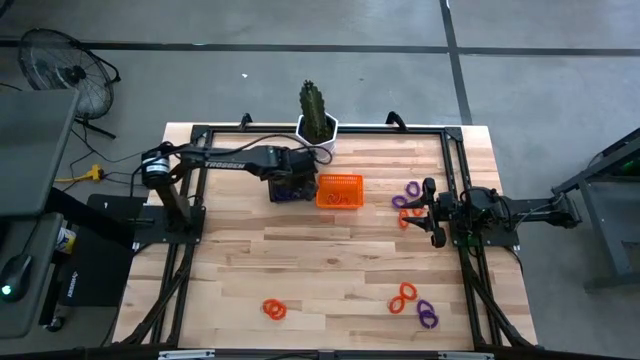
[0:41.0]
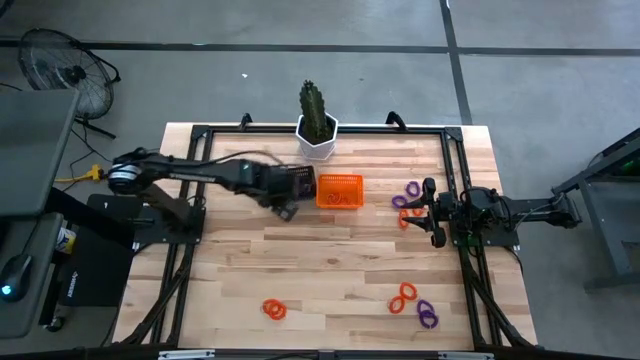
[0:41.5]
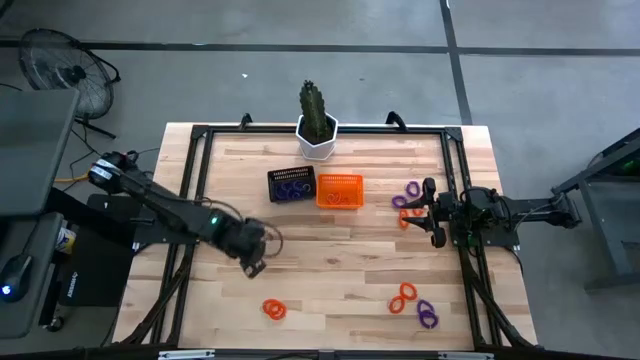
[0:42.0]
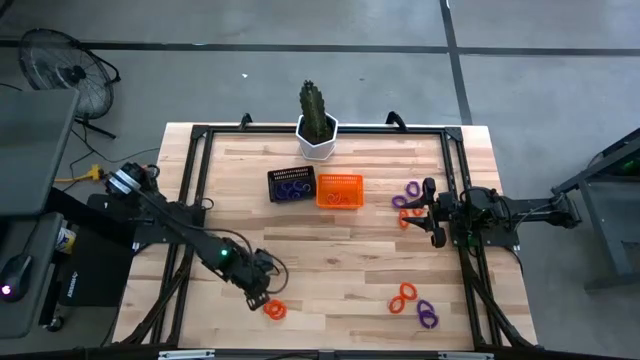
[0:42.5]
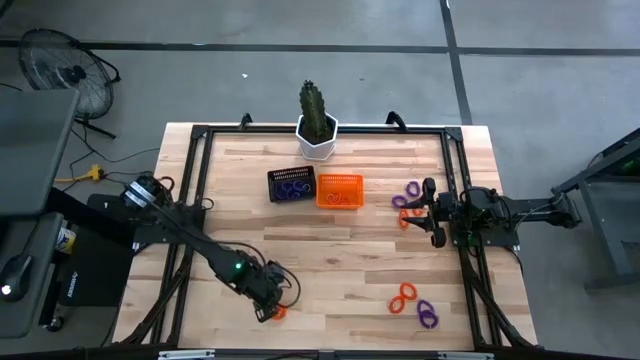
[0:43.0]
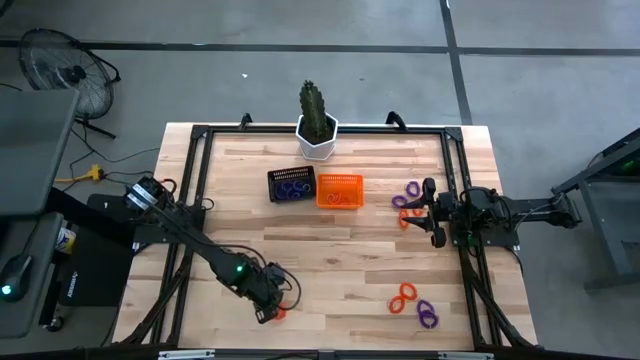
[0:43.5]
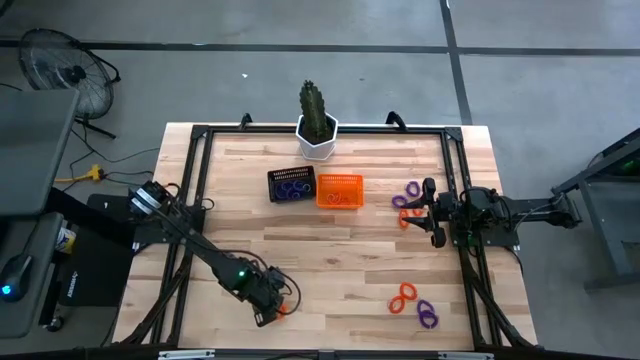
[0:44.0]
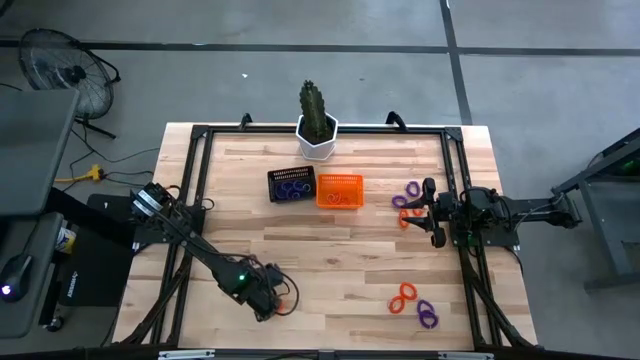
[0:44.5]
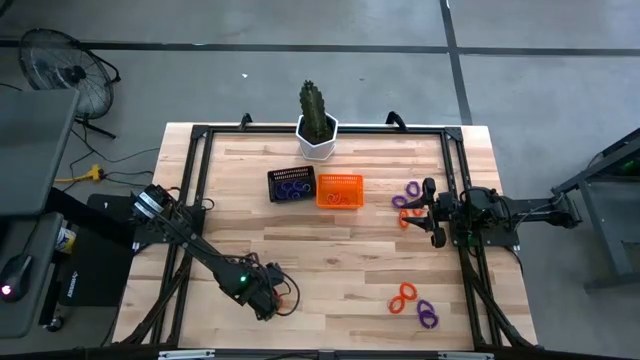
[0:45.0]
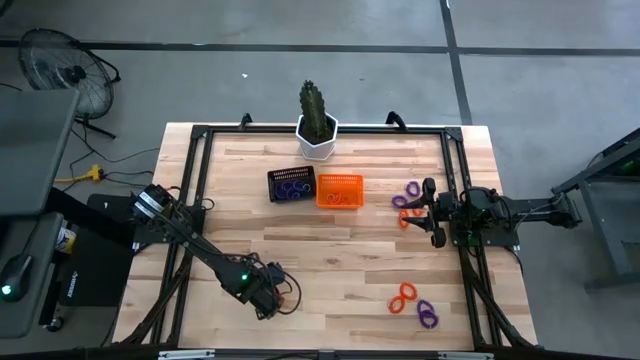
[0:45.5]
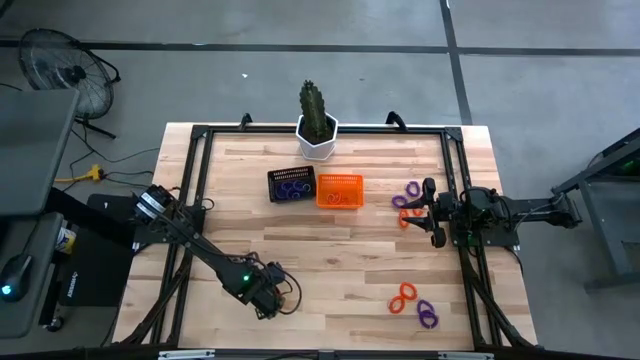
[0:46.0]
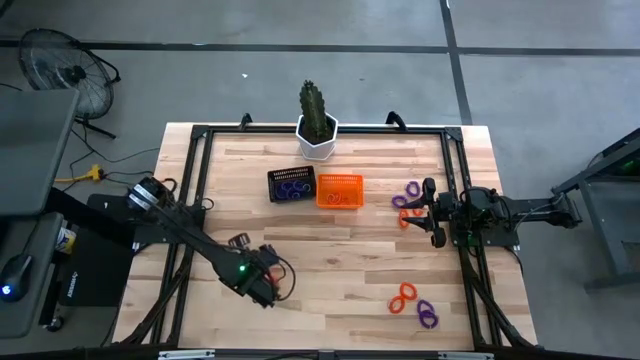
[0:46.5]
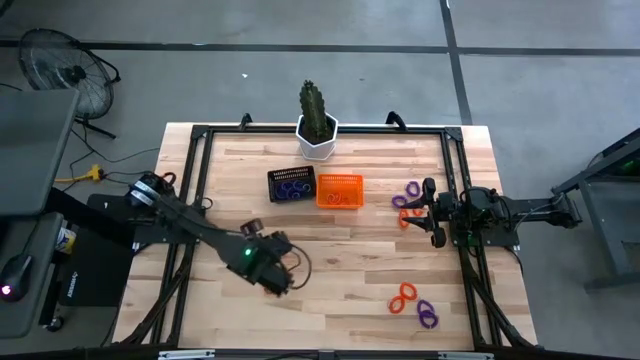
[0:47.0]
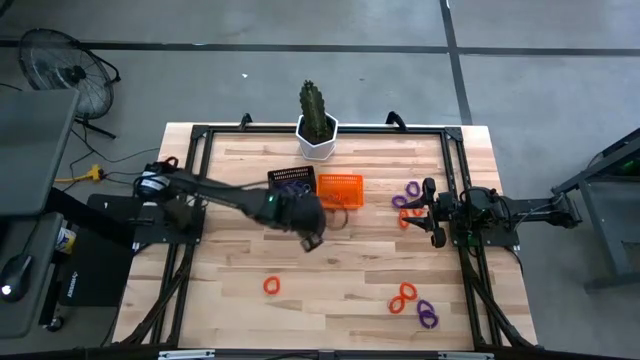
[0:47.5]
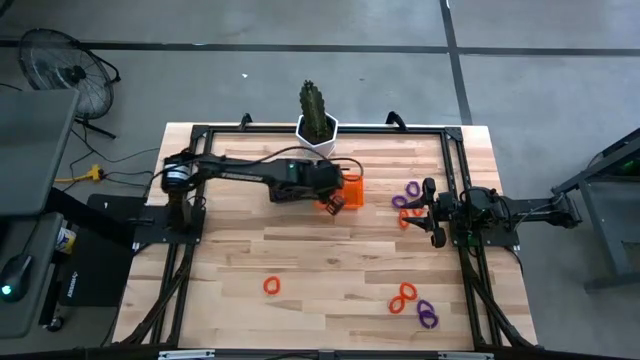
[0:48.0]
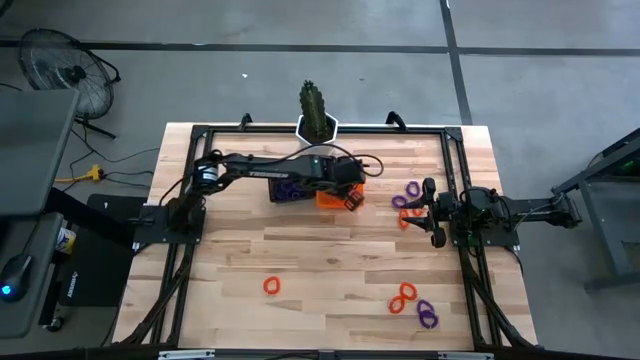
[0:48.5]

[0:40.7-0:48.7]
Task: Sort spring keychains
Put the orange spring keychain in the orange bin

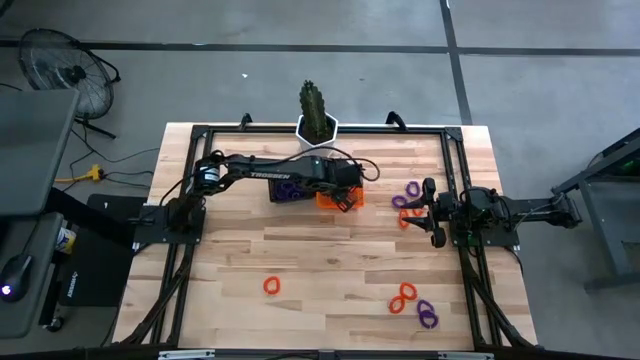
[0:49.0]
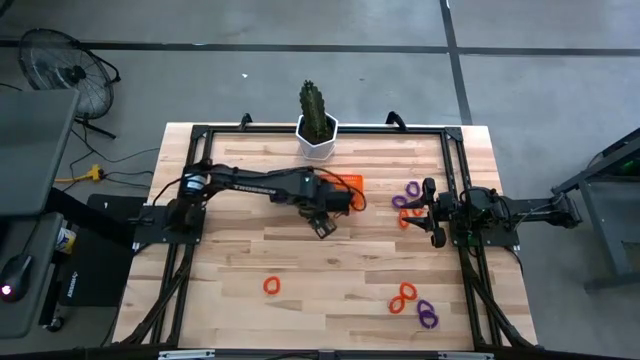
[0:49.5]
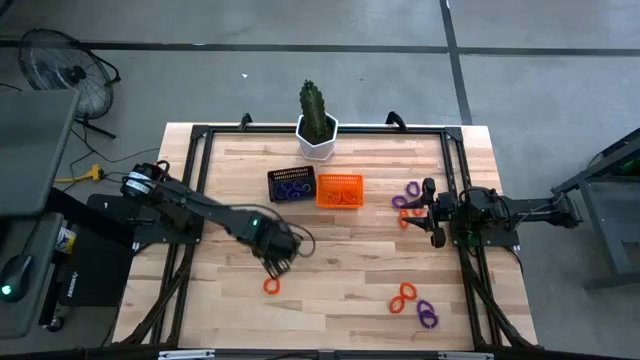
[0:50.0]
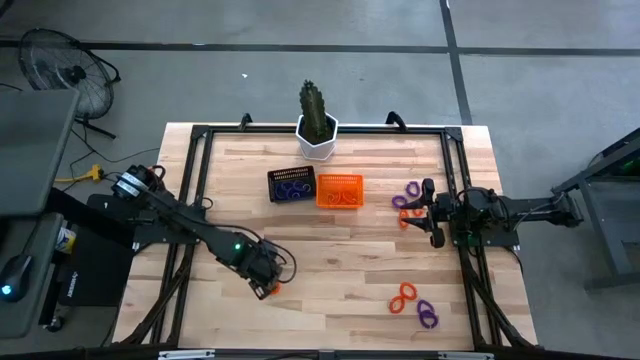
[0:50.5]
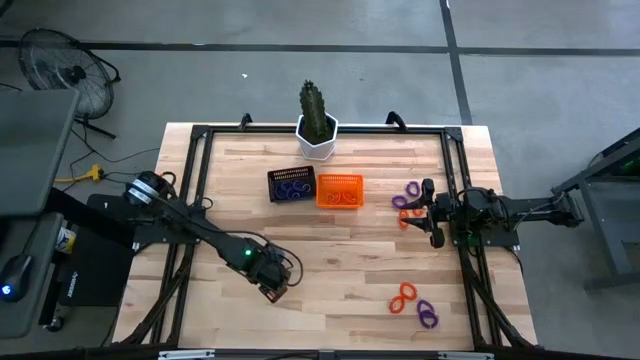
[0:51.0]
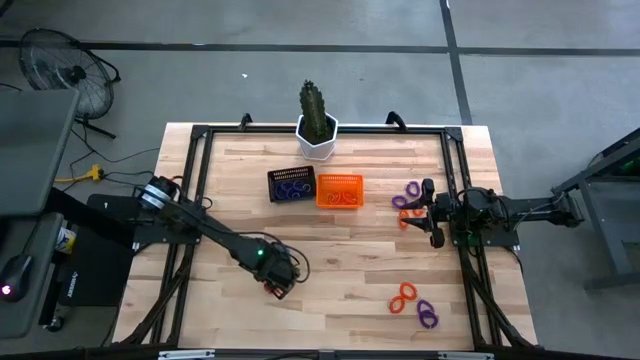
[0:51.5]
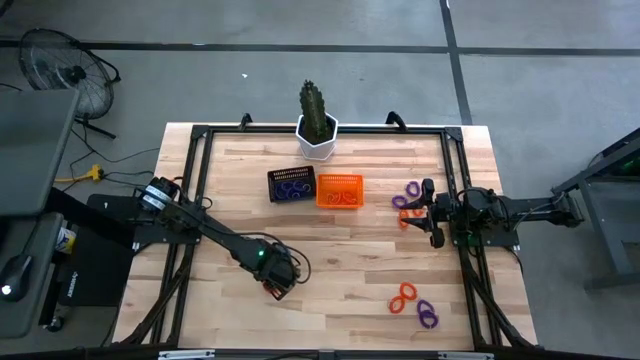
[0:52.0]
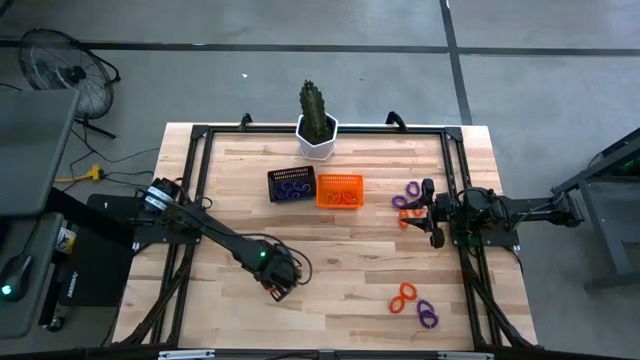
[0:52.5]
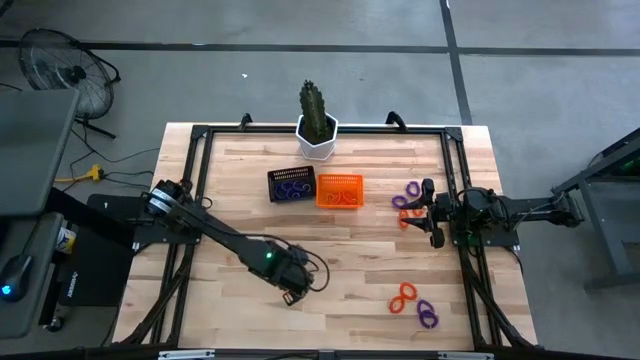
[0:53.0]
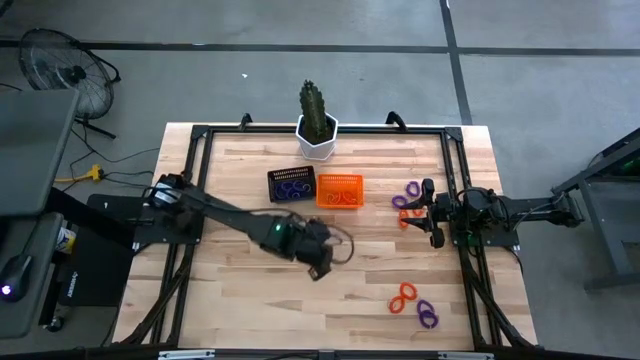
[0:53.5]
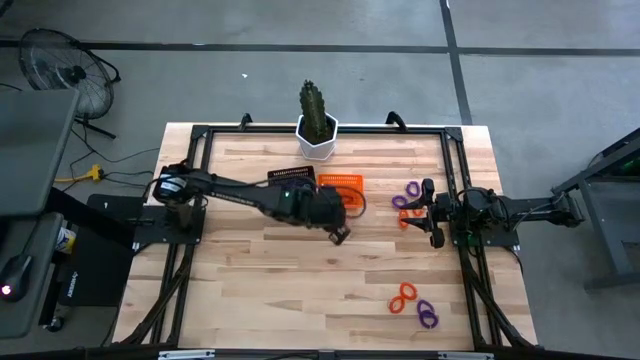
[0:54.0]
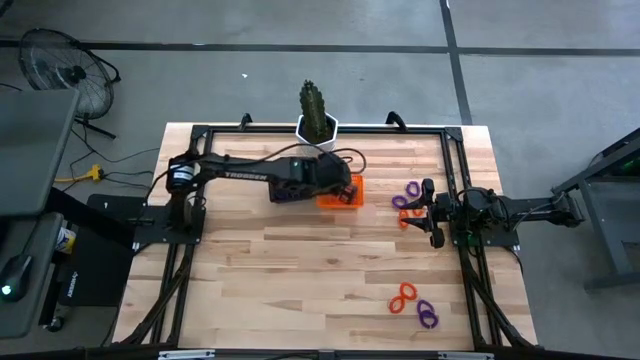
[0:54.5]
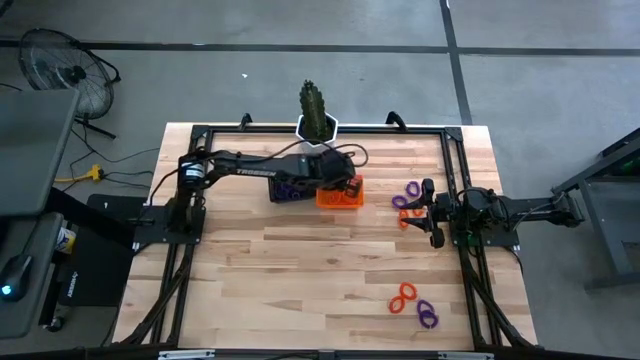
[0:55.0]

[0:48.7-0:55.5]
Put the orange spring keychain in the orange bin

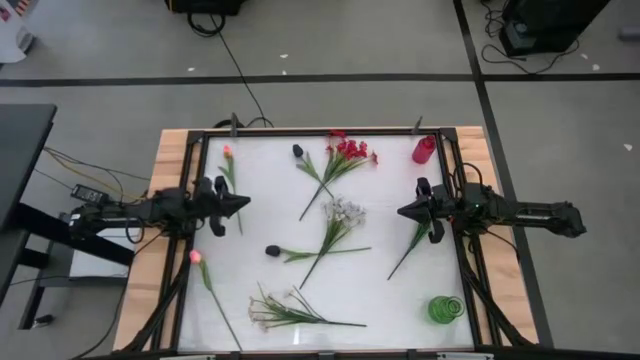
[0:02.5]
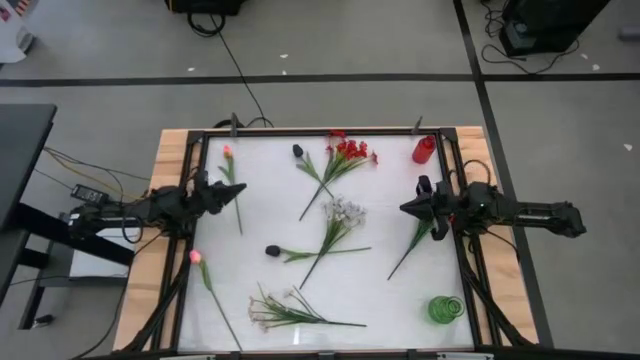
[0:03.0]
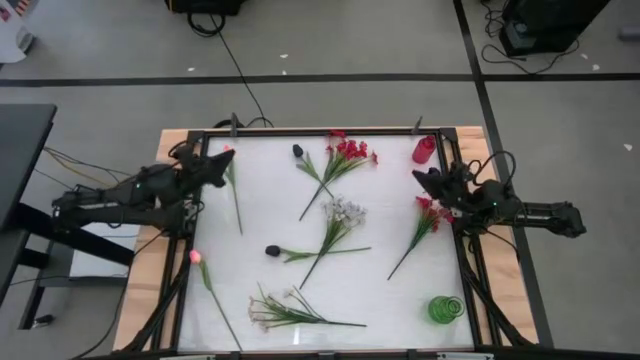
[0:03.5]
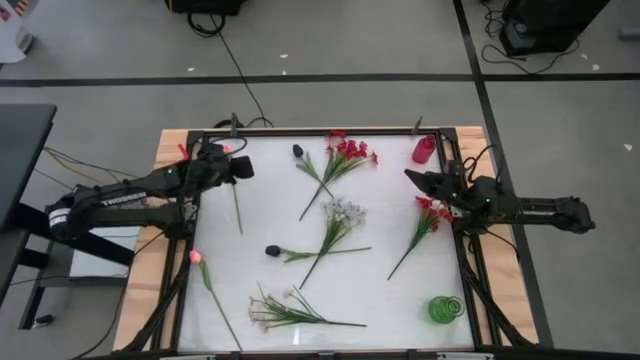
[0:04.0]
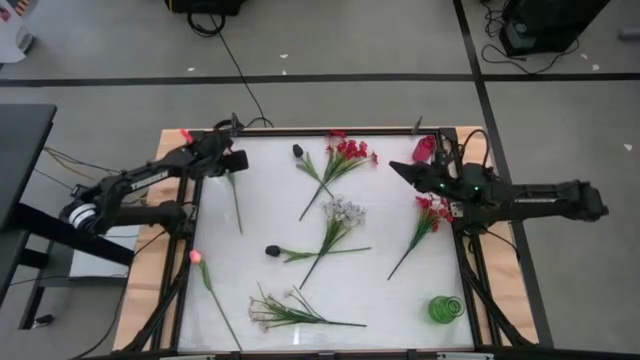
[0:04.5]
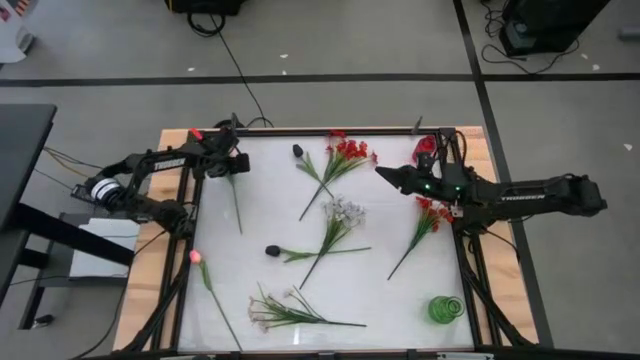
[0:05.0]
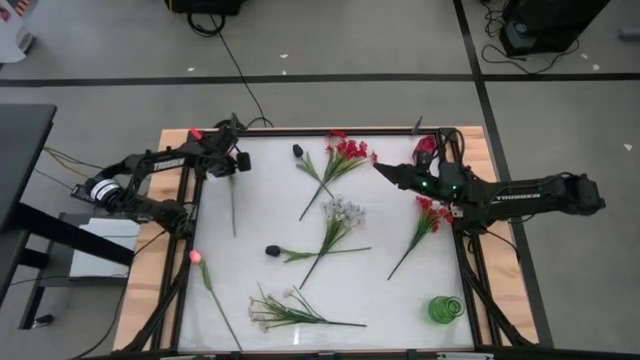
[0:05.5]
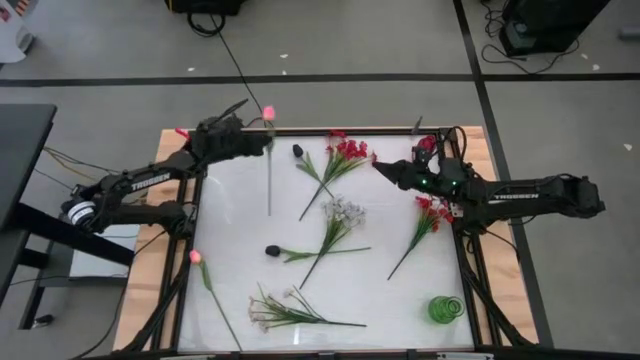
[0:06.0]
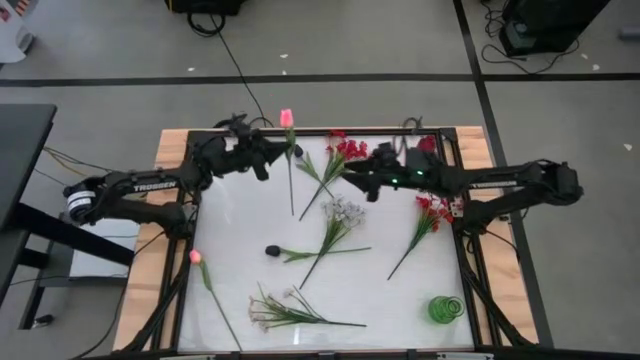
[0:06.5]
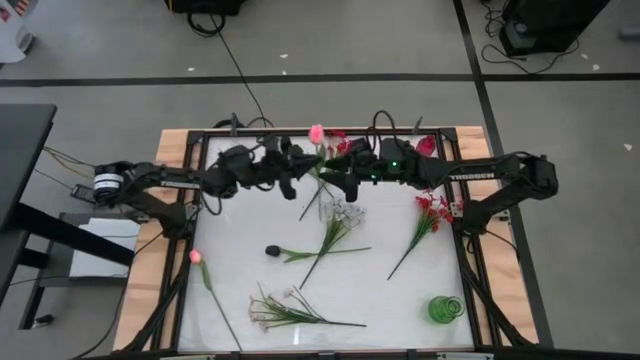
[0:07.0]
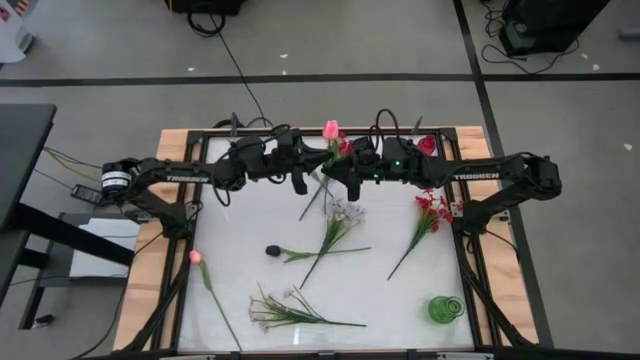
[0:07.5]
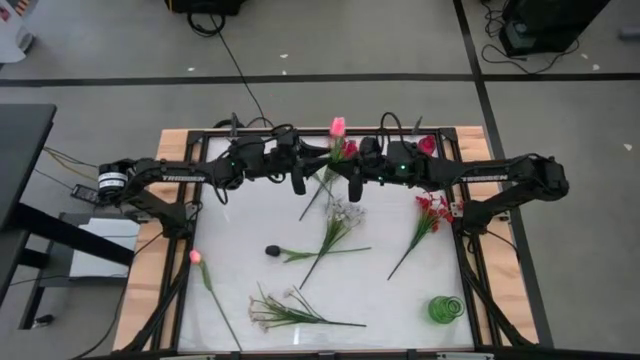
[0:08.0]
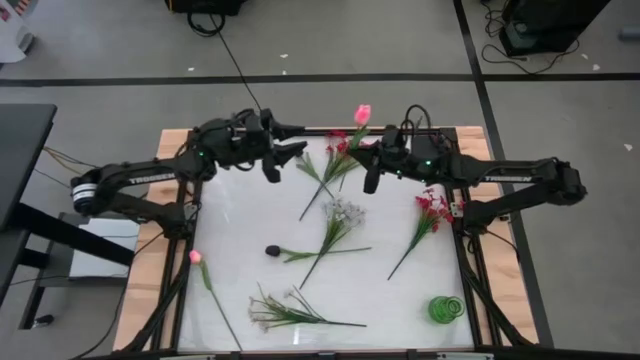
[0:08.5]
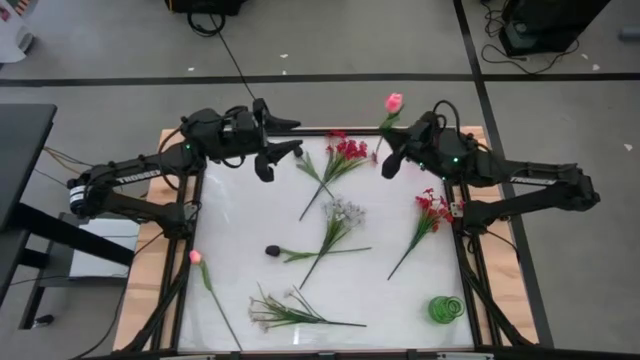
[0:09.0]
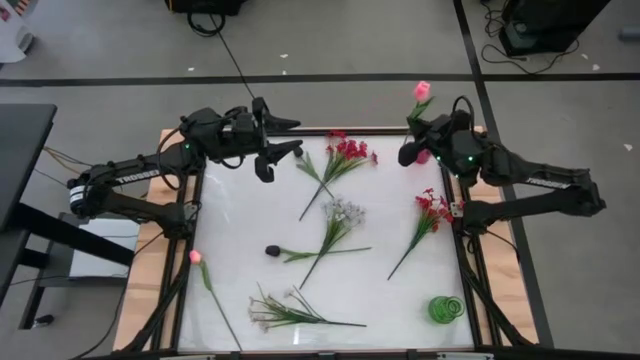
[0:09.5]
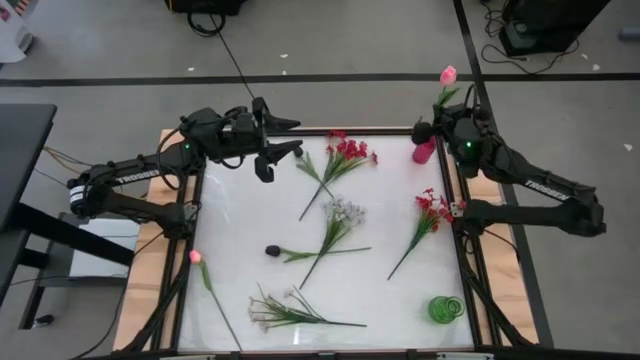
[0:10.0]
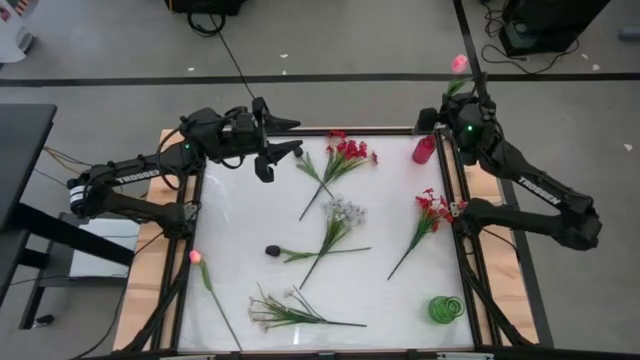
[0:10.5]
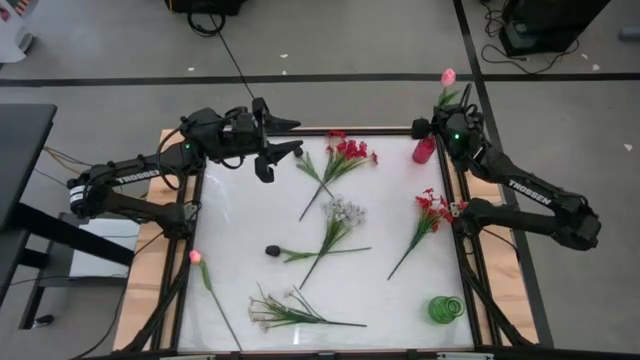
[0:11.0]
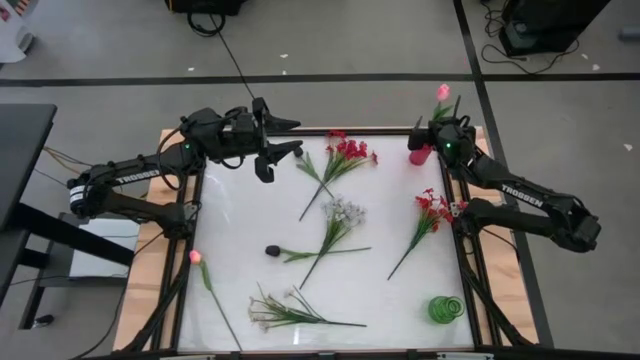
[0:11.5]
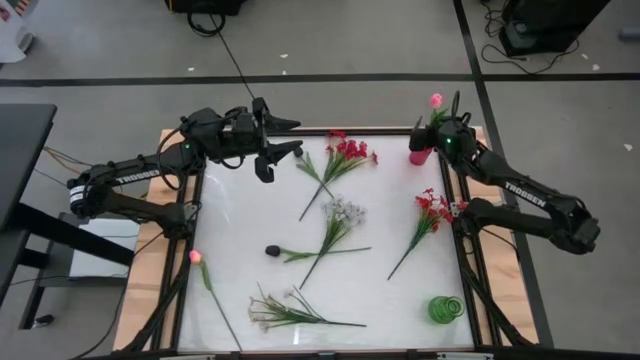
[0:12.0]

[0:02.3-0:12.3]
Task: Sort flowers into vase by color
Put the top pink flower into the red vase
